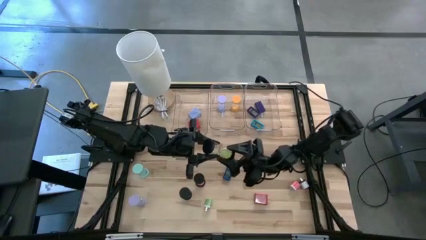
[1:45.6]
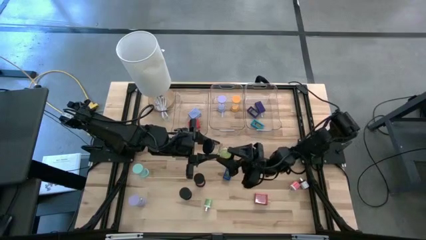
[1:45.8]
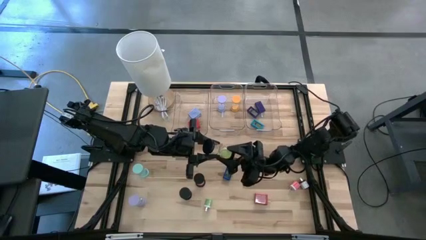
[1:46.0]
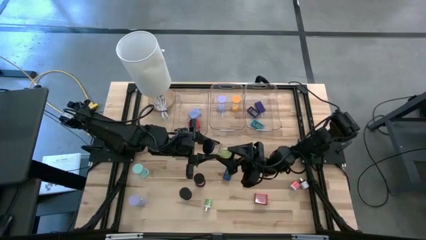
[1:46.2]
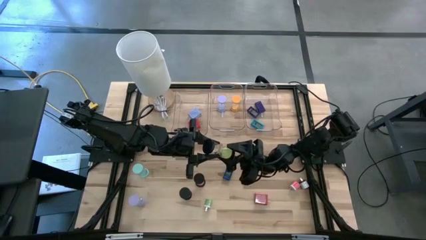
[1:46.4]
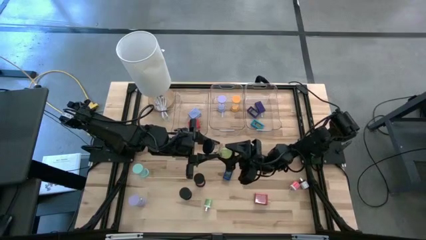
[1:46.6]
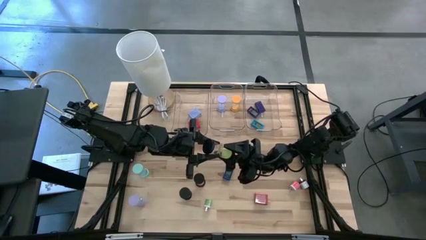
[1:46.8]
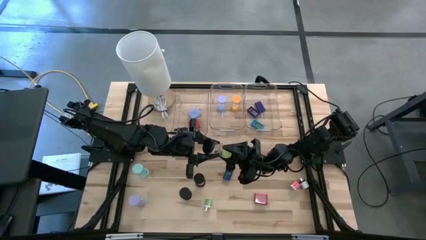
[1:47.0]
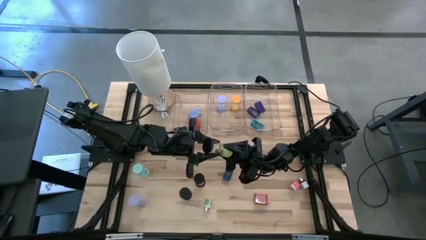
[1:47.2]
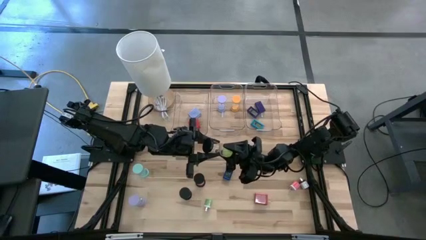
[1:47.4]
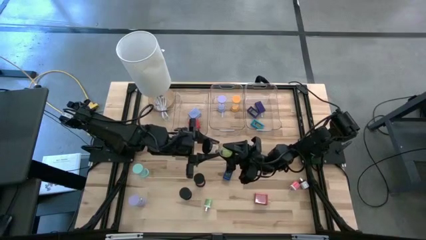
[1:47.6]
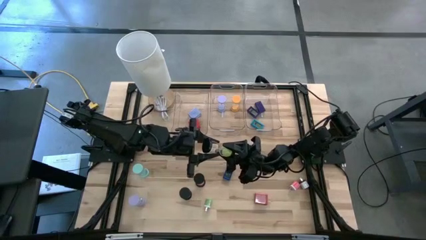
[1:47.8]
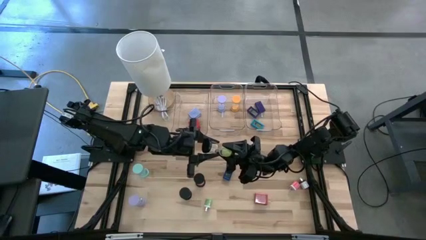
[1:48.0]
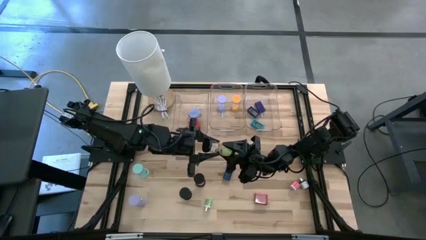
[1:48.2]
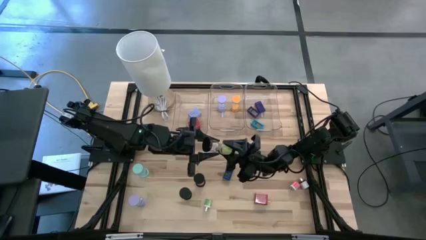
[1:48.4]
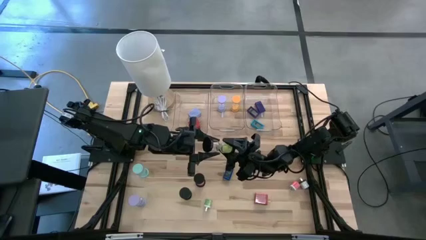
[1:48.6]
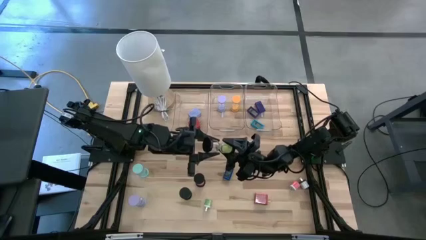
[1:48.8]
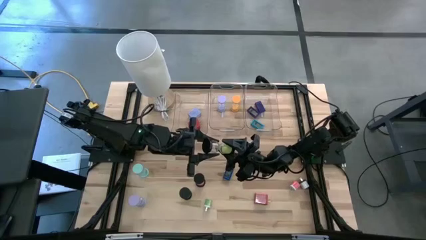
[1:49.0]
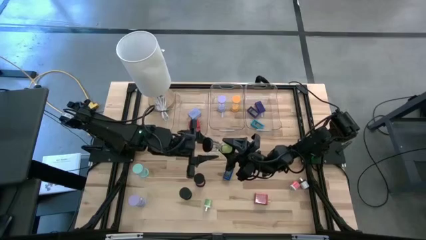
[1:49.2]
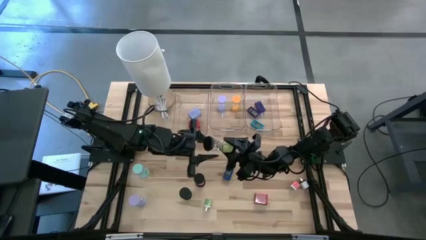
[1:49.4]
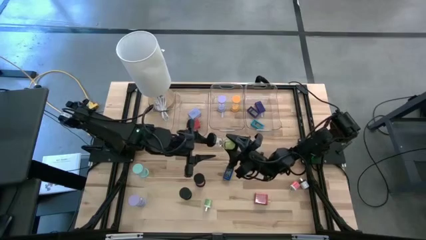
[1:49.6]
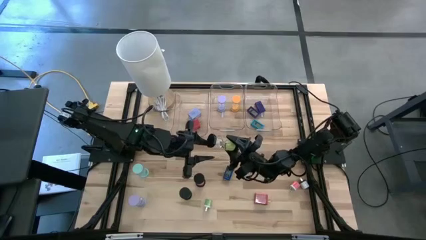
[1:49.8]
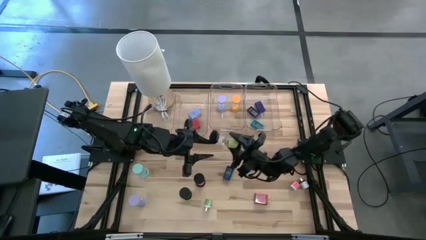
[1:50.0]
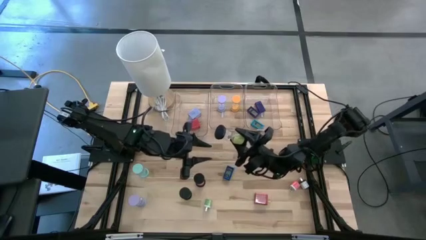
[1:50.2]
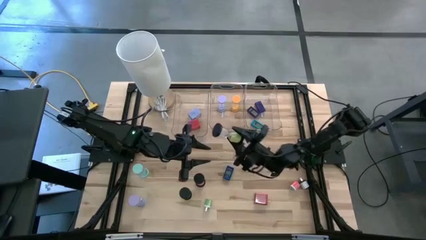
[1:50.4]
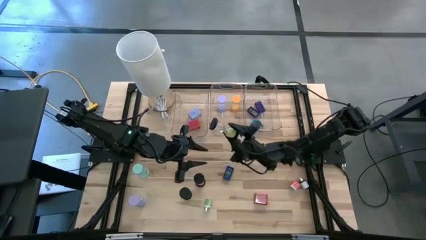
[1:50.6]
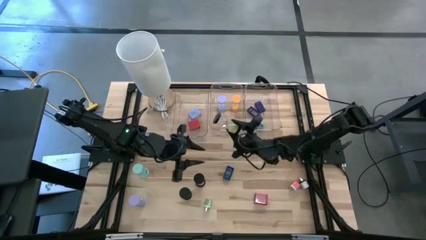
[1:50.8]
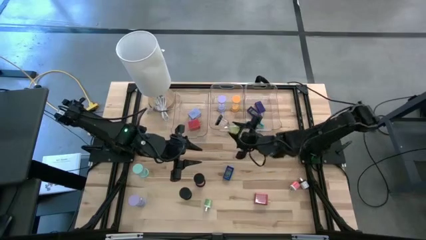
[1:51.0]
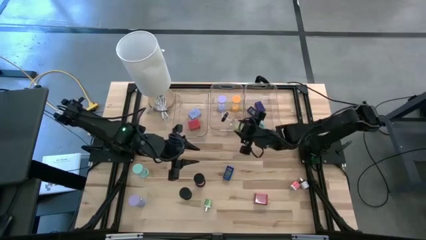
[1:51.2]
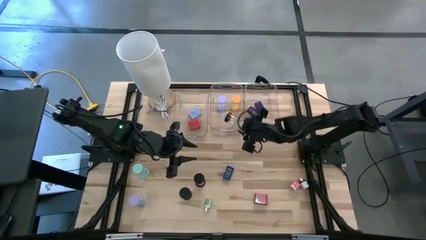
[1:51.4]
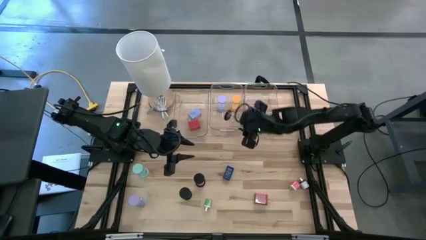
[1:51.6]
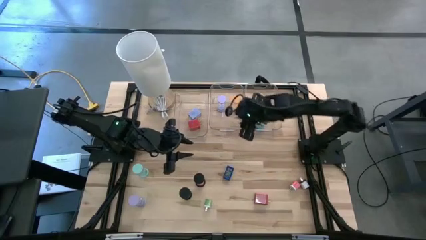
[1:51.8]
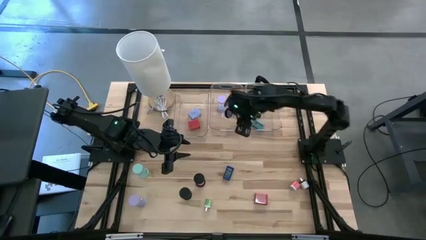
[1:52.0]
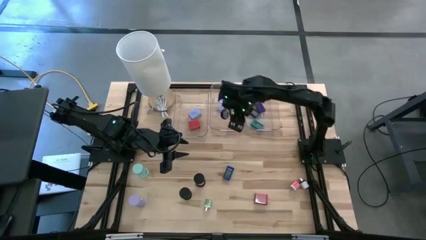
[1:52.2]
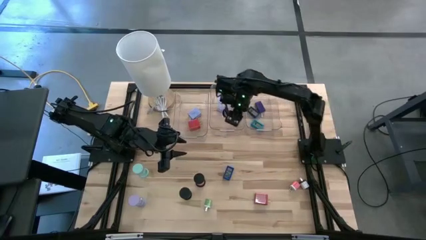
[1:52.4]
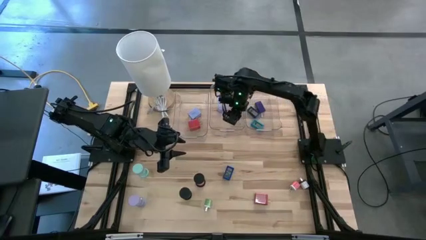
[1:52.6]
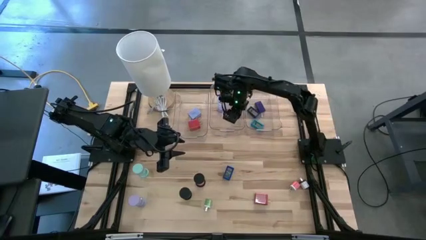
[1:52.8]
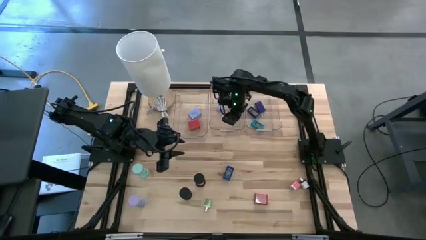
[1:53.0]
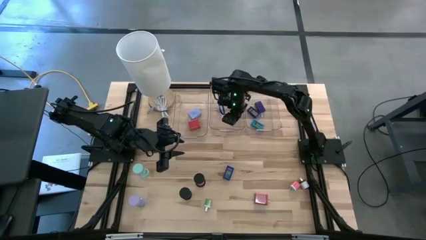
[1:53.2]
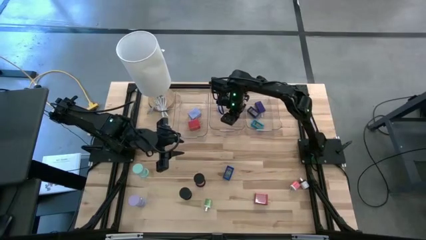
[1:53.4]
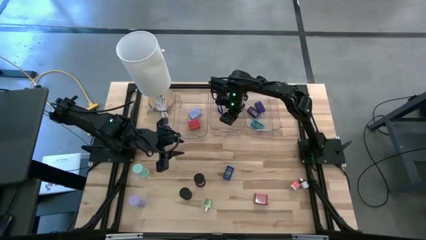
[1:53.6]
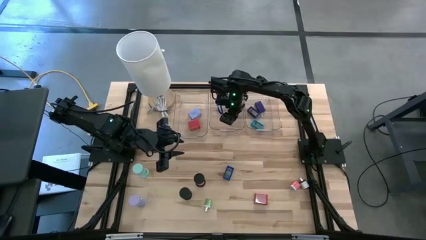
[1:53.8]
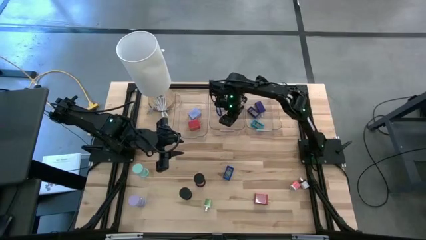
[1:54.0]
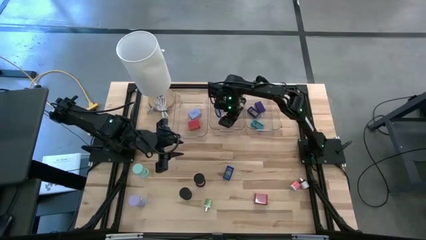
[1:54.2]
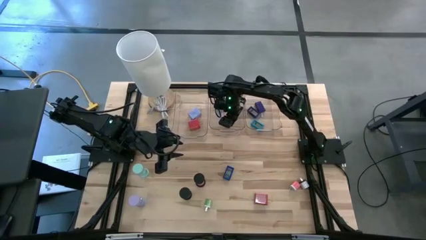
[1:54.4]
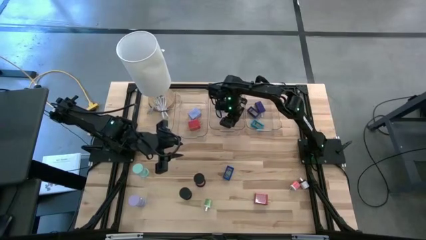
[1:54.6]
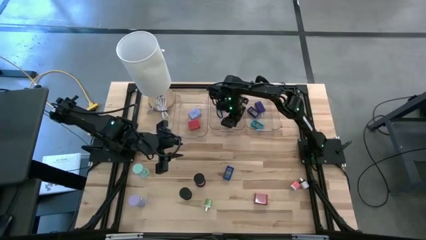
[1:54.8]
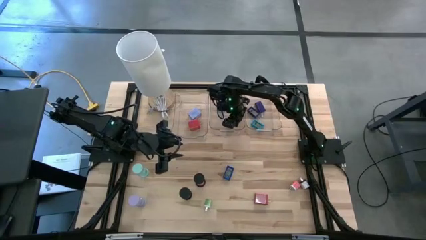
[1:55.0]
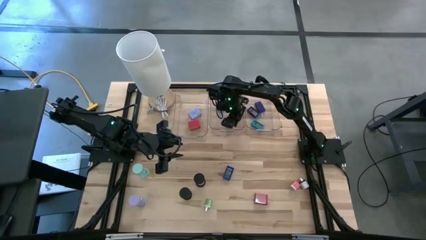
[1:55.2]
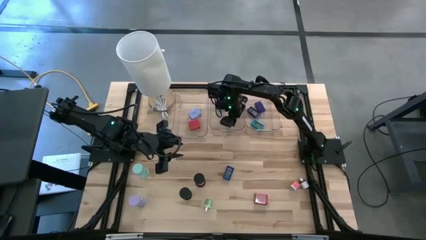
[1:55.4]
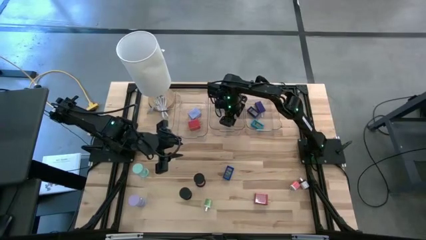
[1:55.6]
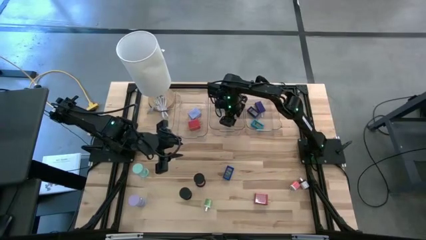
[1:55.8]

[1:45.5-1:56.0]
Task: Pick & Place Office items
Put the green hourglass into the middle transparent bin
